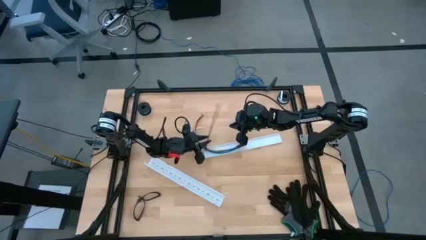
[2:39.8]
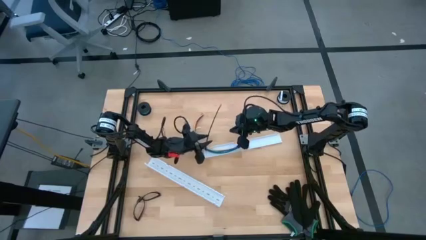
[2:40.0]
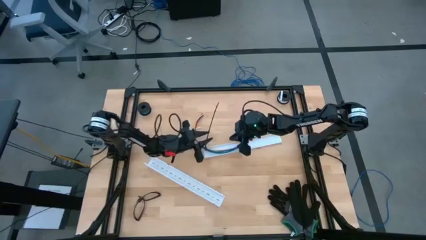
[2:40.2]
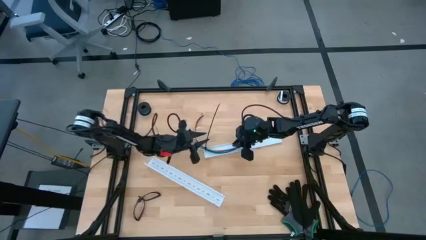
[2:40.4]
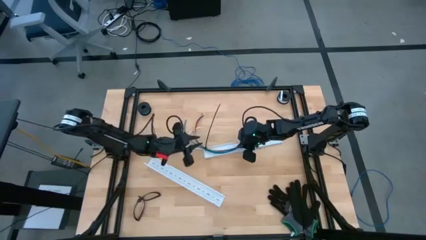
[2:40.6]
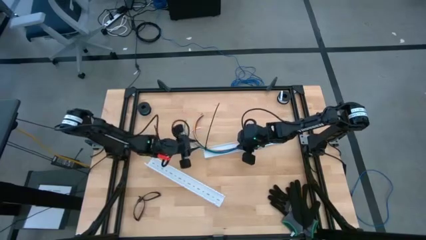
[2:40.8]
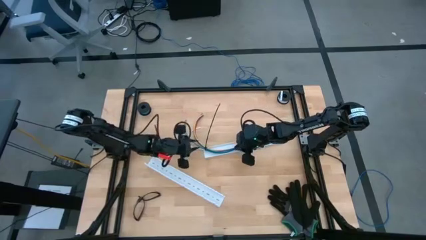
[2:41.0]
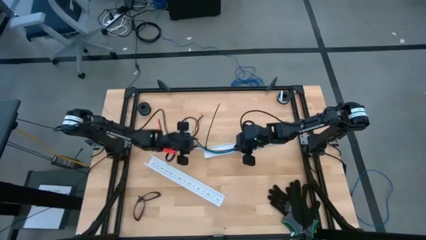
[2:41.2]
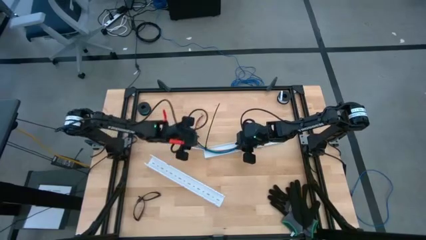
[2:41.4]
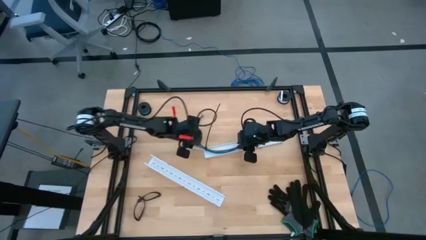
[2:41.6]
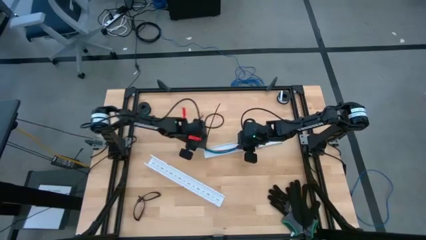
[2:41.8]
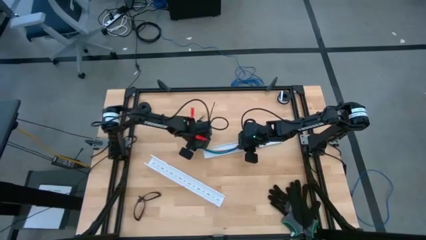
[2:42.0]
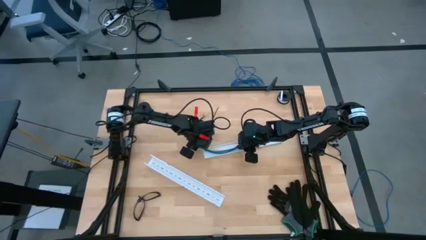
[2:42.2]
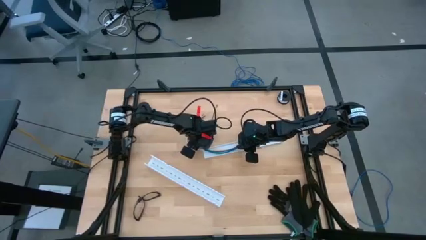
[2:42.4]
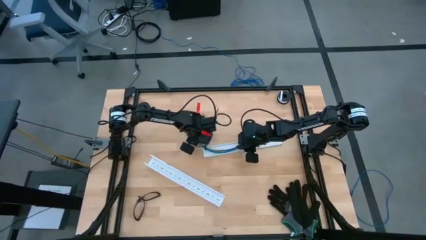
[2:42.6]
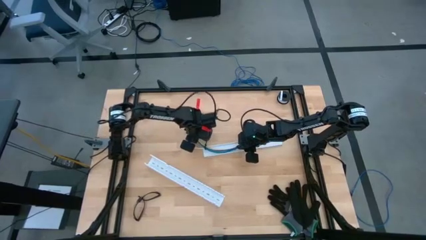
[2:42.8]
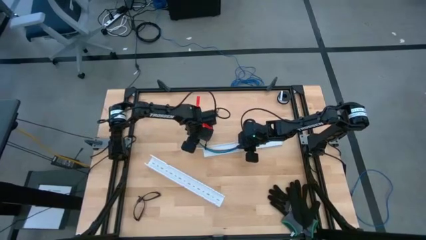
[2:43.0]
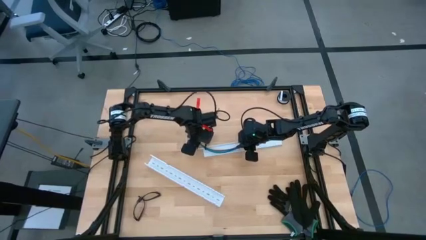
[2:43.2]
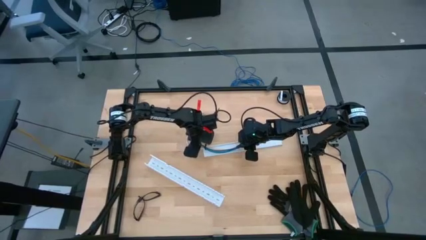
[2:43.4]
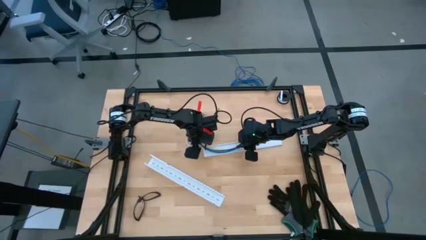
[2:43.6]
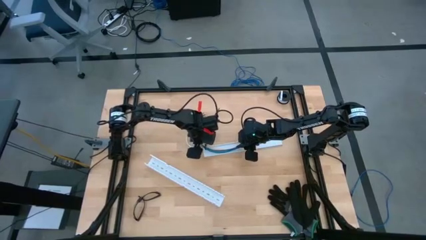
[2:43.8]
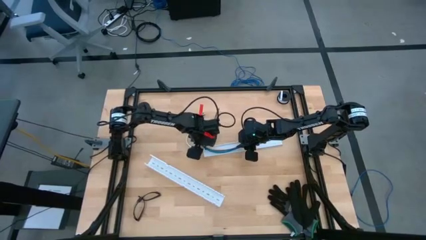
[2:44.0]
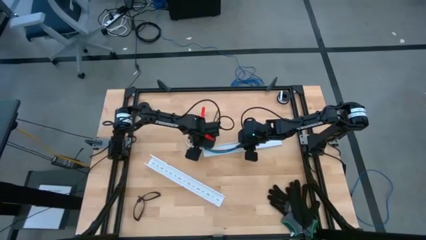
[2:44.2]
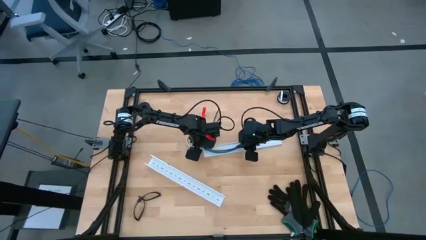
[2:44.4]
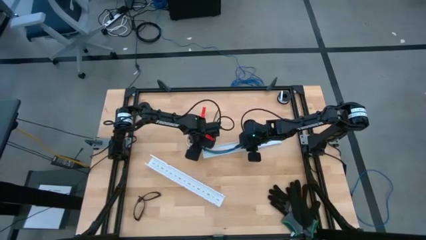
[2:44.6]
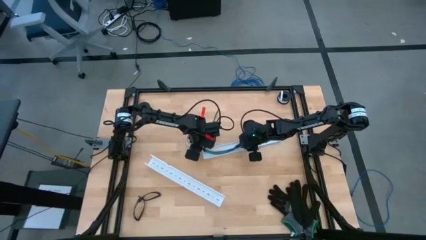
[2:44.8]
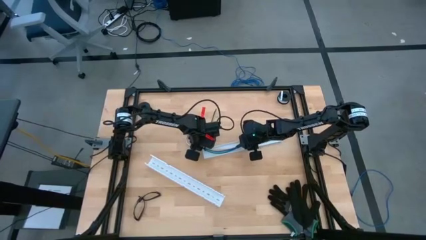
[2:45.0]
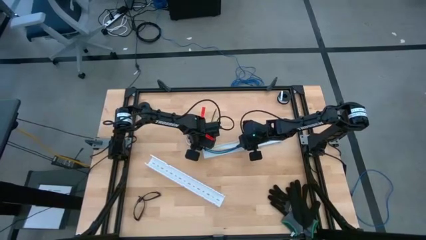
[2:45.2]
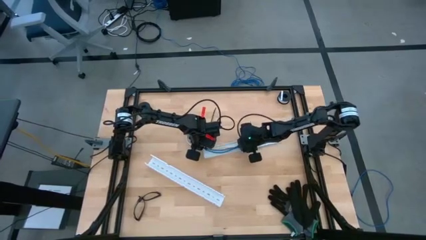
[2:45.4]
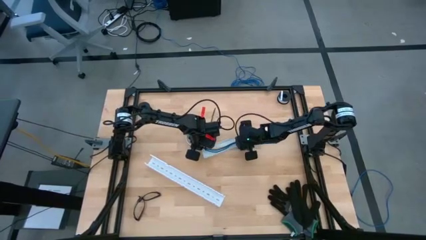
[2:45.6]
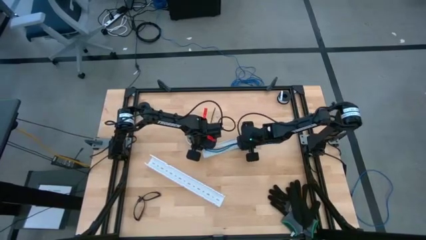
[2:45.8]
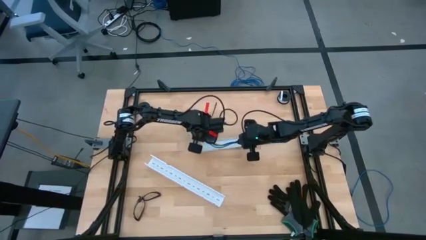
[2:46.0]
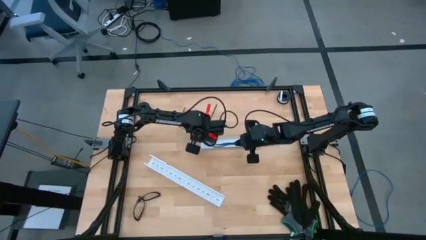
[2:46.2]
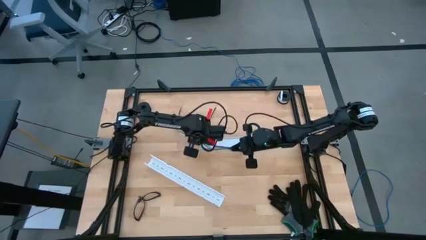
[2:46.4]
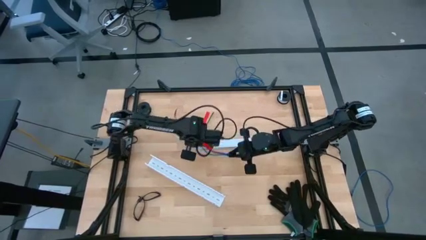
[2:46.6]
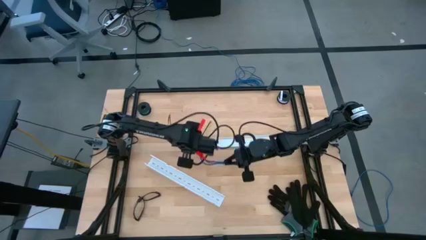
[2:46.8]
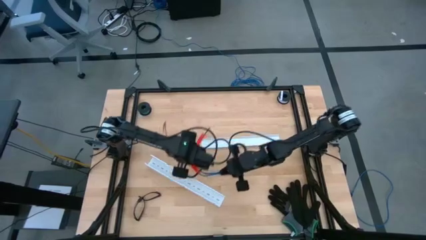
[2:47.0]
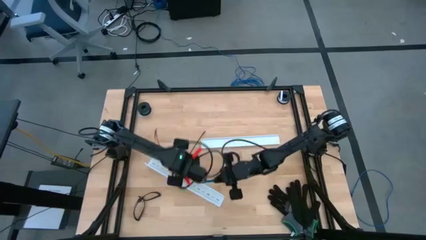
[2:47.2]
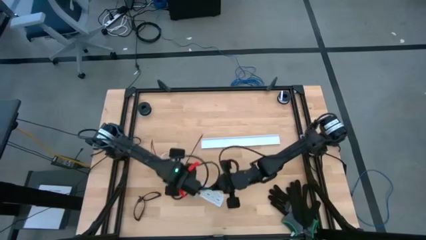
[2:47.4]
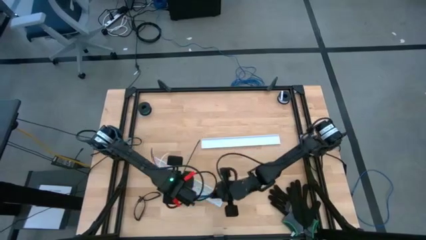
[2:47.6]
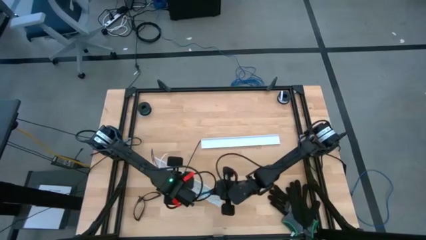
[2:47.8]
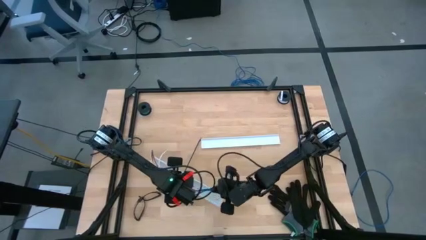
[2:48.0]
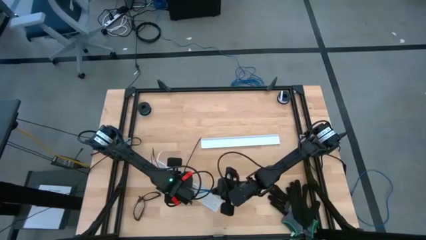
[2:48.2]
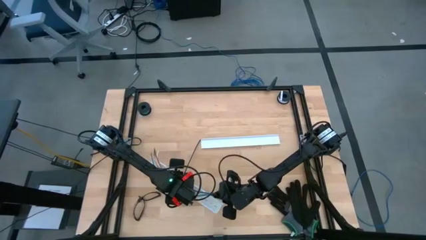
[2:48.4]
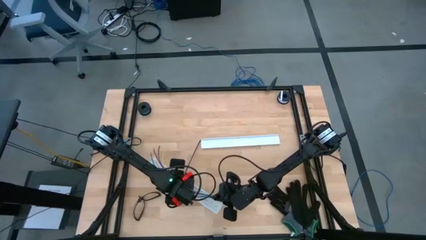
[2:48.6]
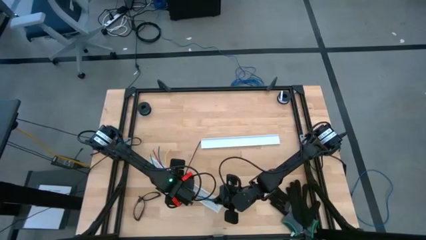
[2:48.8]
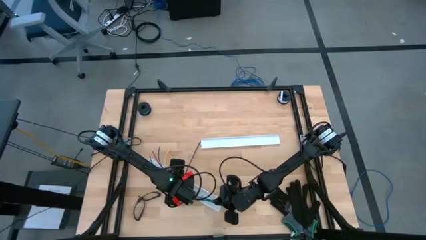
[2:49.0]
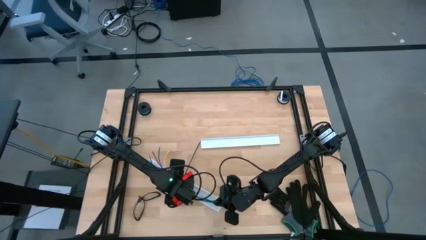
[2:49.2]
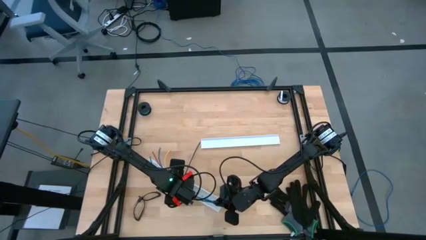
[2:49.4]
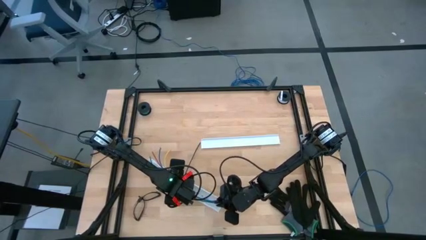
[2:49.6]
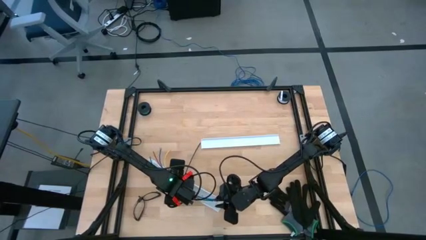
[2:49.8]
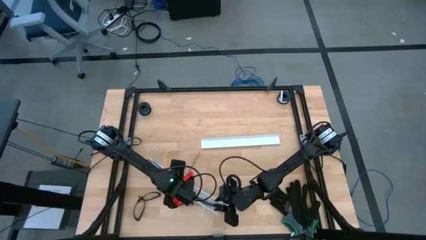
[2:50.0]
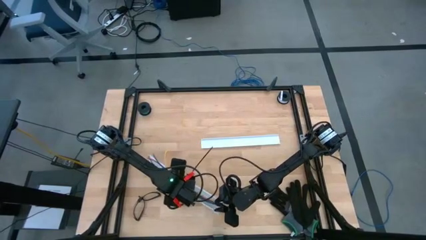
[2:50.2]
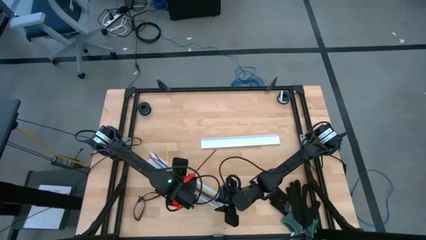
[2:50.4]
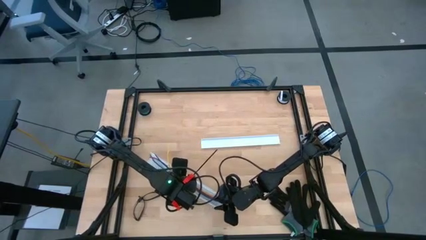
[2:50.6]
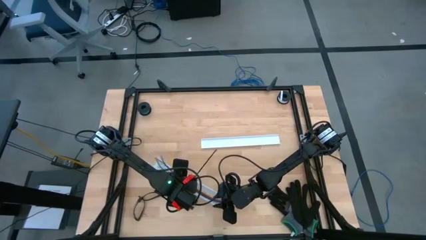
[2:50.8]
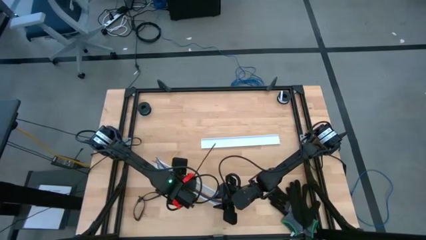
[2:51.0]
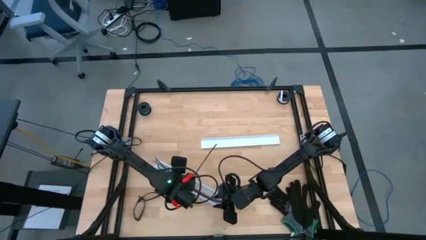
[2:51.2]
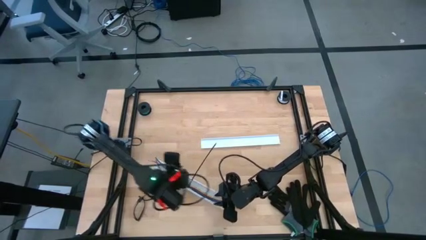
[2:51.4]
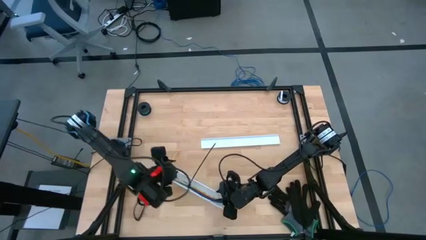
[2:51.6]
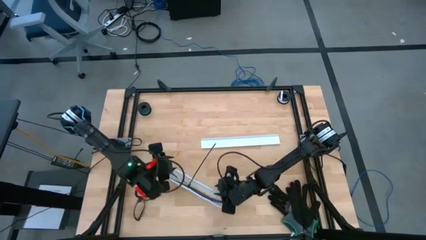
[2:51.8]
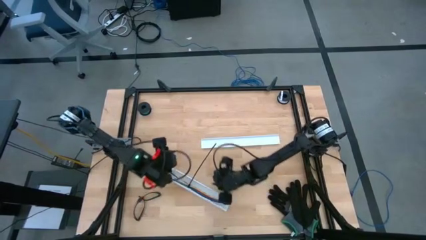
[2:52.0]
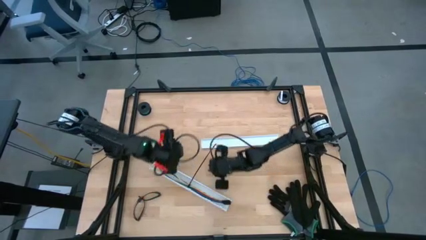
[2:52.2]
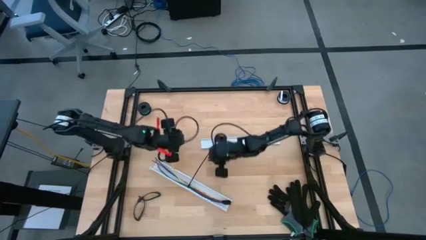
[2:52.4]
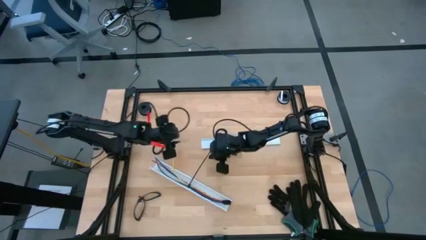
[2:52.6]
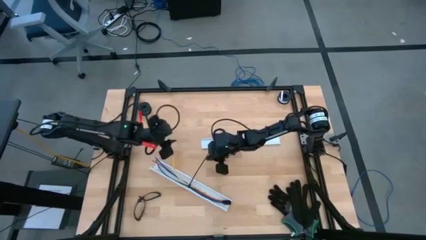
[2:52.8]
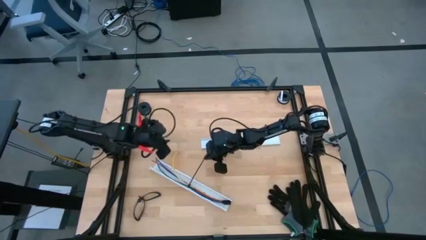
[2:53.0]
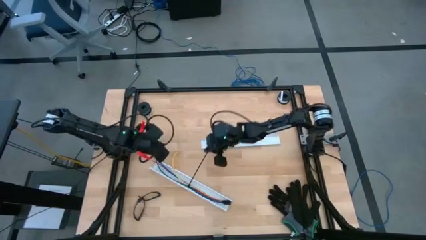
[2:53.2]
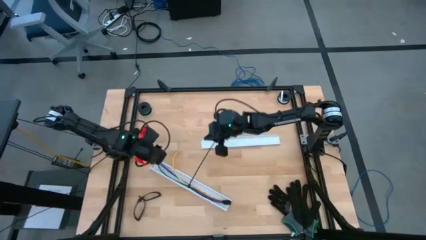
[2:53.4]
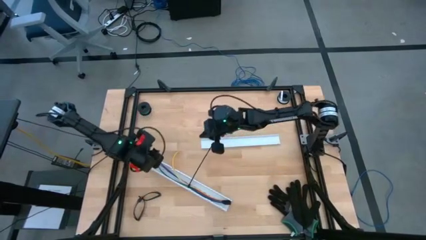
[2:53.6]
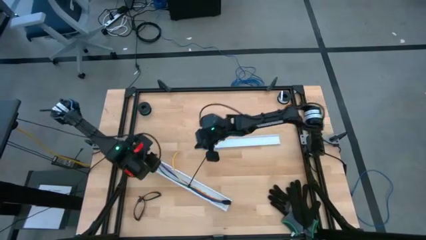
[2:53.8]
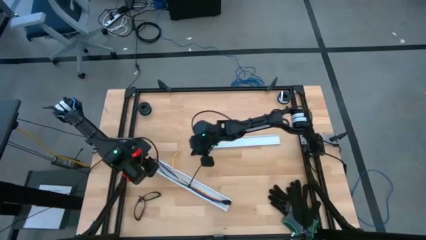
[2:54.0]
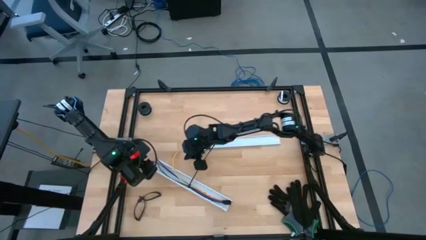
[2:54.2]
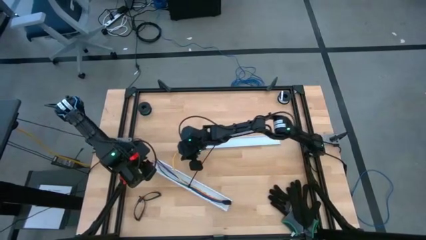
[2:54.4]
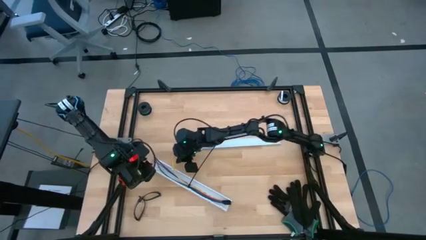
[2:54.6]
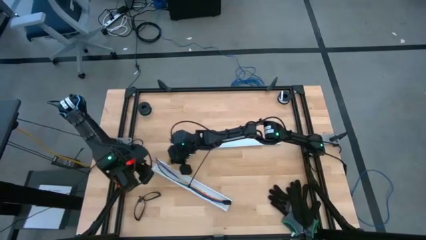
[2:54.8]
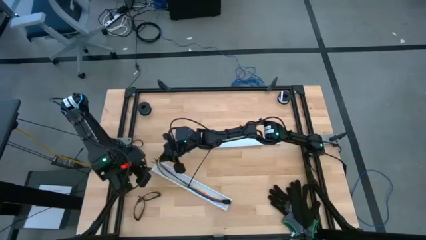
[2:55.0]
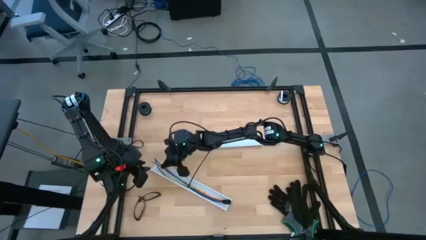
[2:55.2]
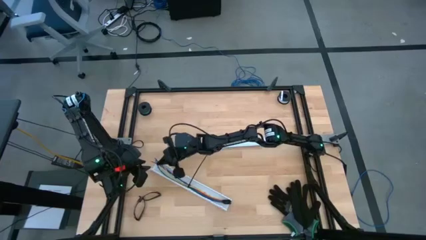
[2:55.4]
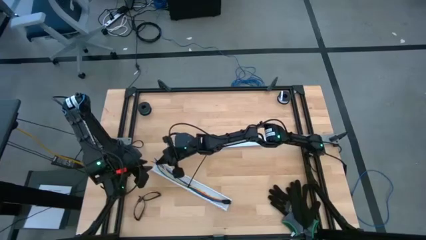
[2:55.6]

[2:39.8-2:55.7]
Task: Ziptie cables
Put the ziptied cable wires in the white cable duct

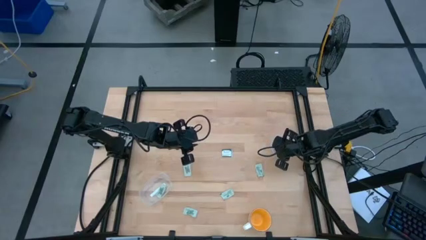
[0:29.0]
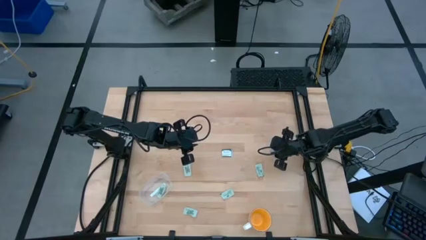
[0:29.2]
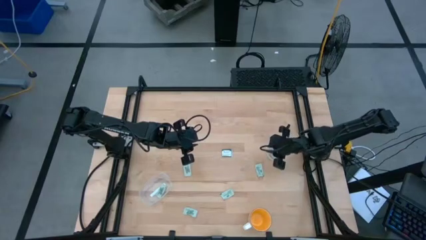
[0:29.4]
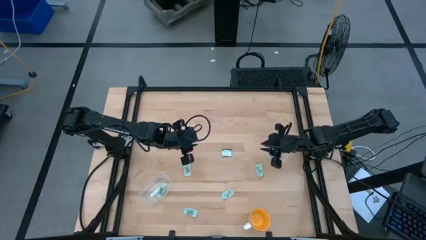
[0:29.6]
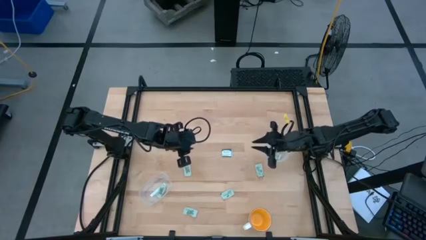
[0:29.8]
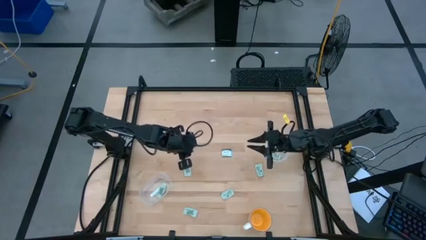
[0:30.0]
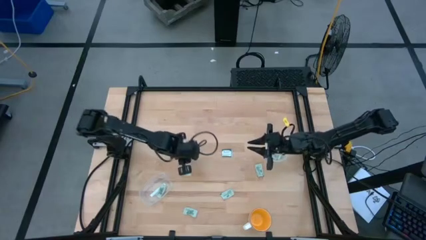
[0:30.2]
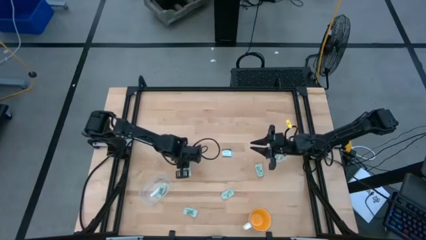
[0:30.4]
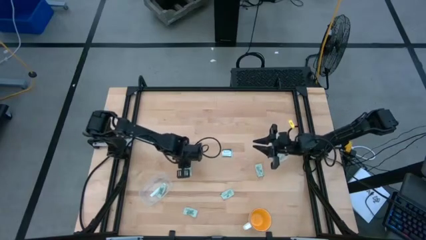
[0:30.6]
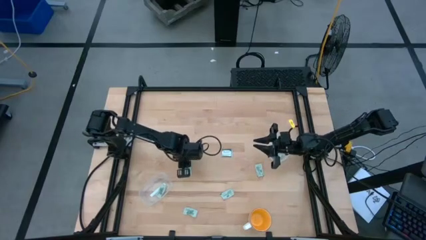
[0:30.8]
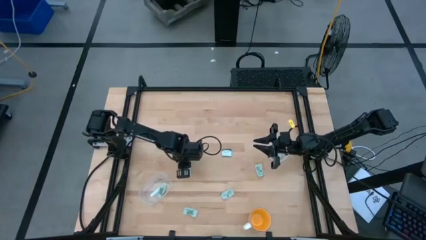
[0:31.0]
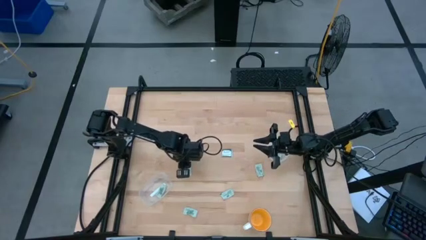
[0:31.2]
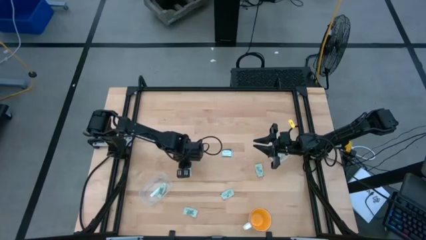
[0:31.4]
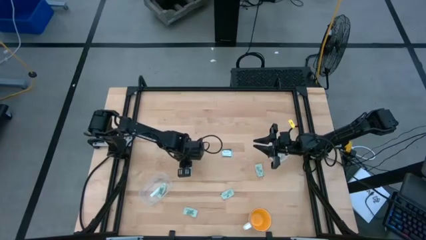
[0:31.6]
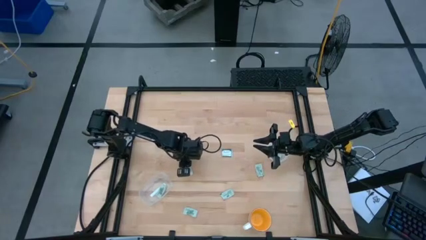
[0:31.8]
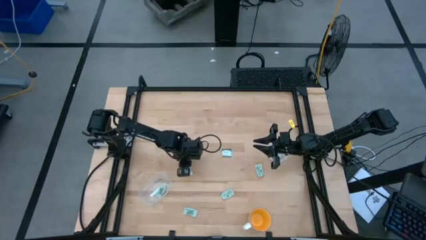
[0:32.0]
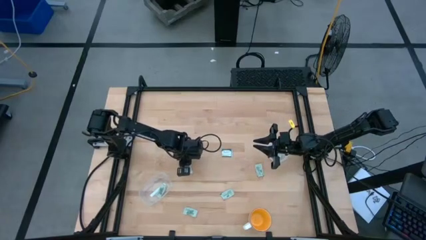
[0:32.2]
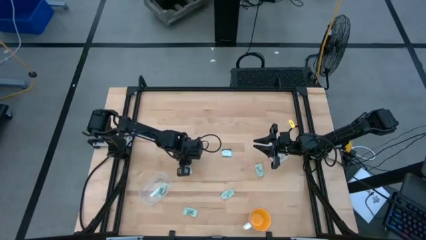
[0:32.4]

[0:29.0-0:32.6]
Task: Pick and place Stevia / Truvia into bins
Put the white stevia packet into the rectangle transparent container
